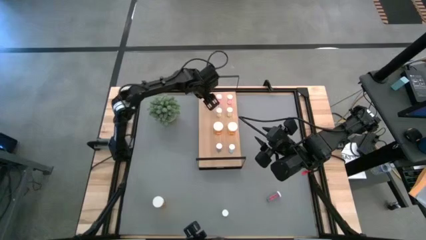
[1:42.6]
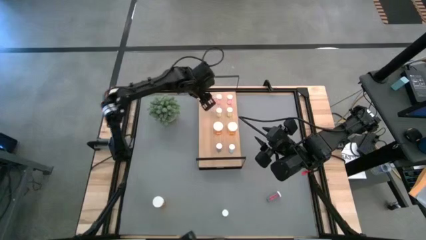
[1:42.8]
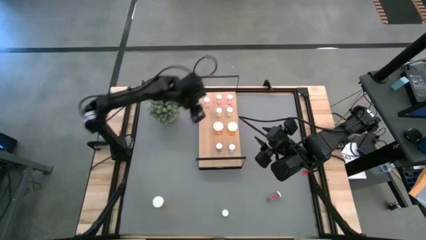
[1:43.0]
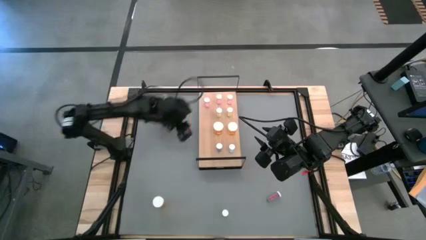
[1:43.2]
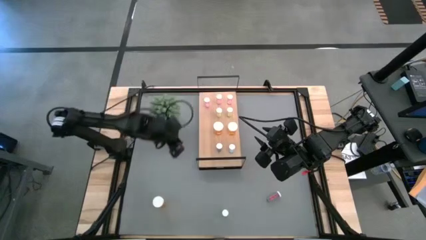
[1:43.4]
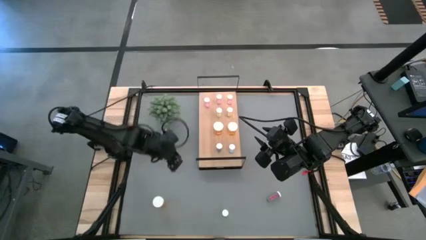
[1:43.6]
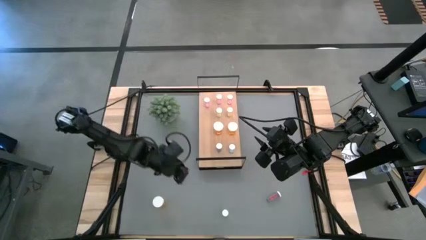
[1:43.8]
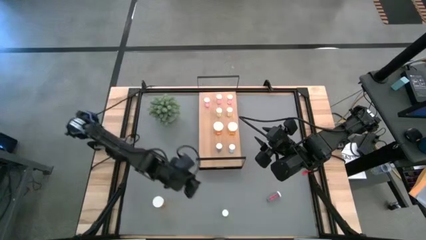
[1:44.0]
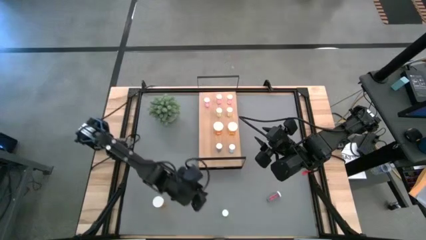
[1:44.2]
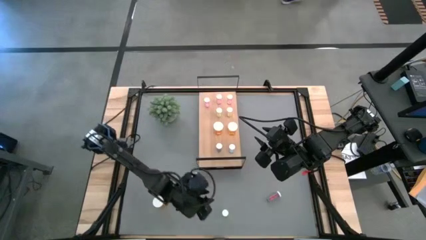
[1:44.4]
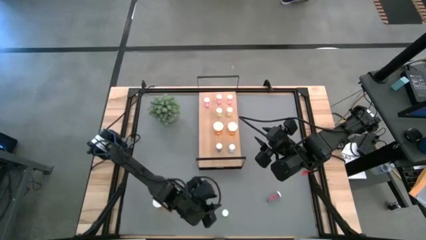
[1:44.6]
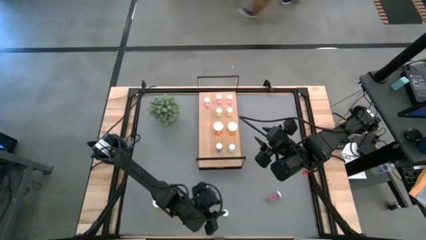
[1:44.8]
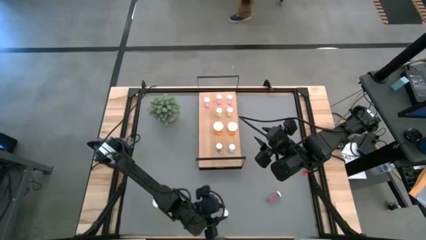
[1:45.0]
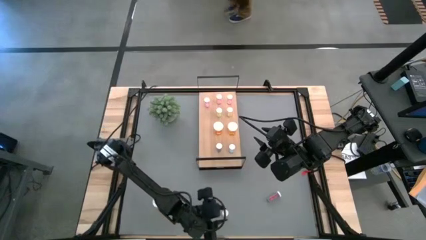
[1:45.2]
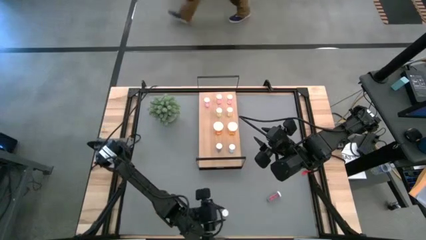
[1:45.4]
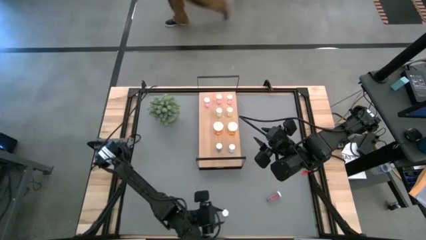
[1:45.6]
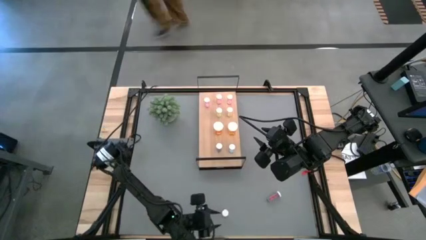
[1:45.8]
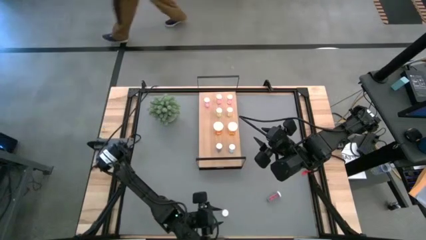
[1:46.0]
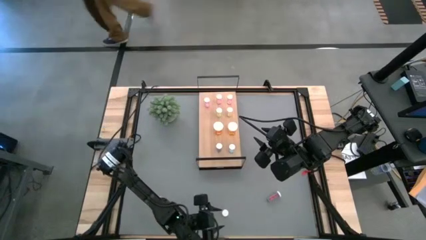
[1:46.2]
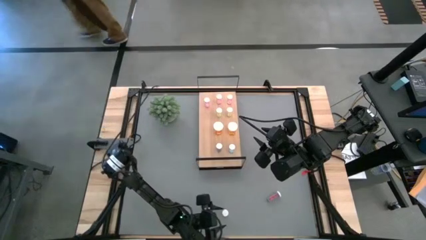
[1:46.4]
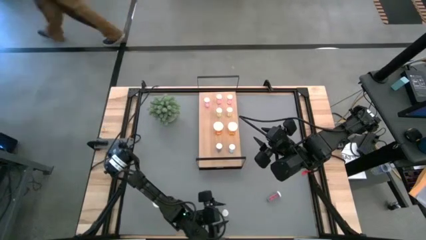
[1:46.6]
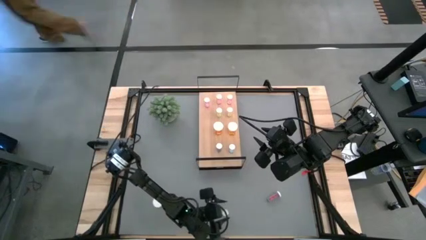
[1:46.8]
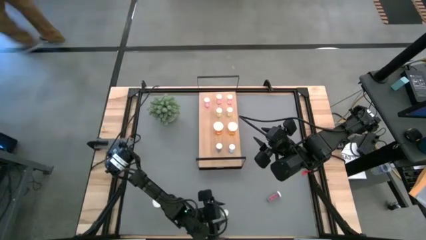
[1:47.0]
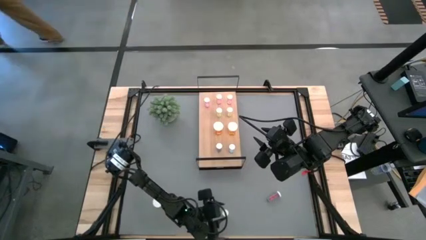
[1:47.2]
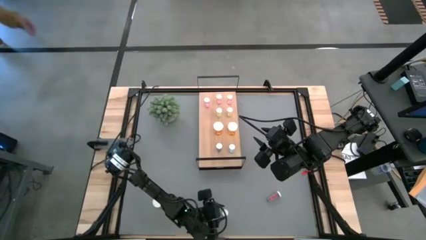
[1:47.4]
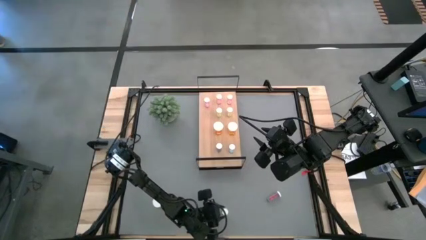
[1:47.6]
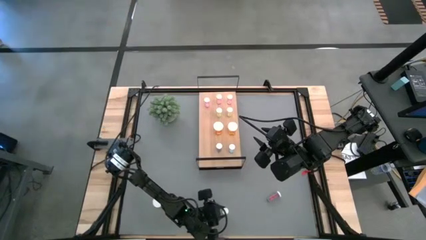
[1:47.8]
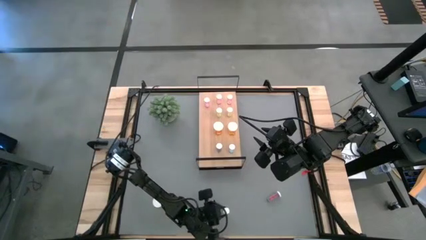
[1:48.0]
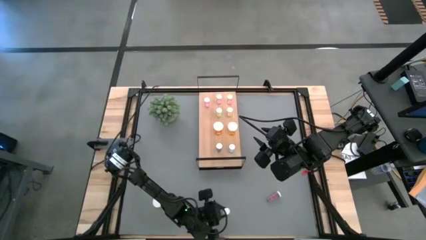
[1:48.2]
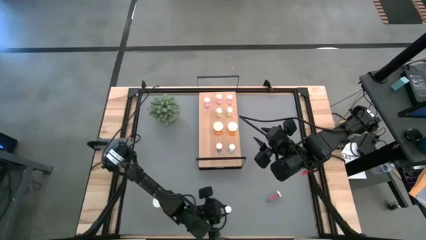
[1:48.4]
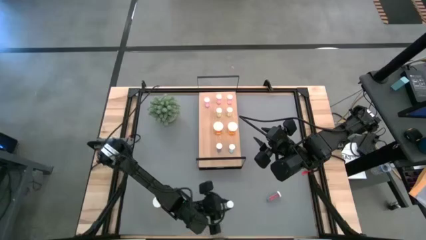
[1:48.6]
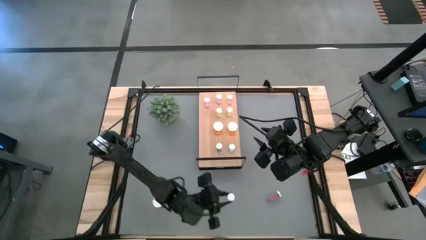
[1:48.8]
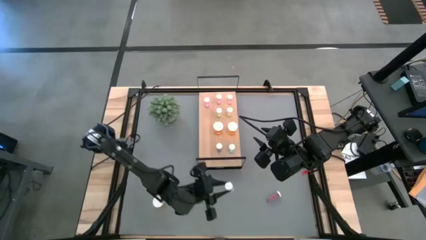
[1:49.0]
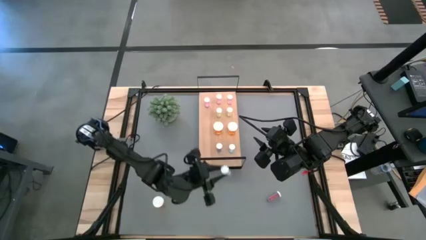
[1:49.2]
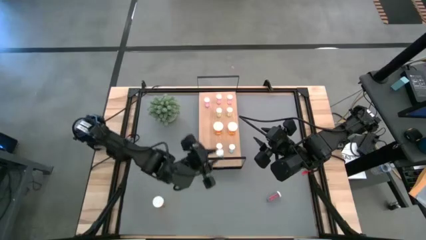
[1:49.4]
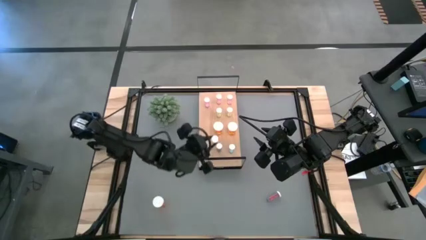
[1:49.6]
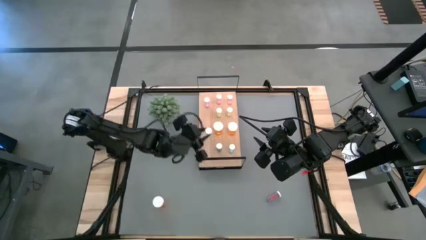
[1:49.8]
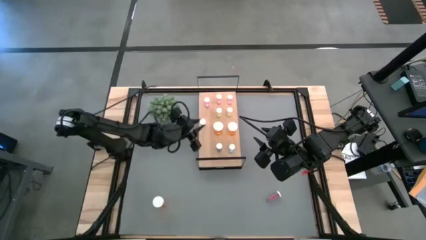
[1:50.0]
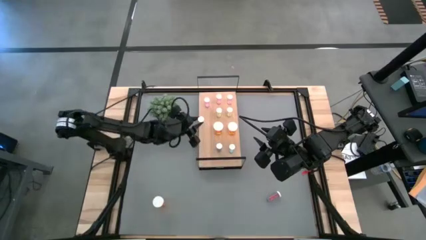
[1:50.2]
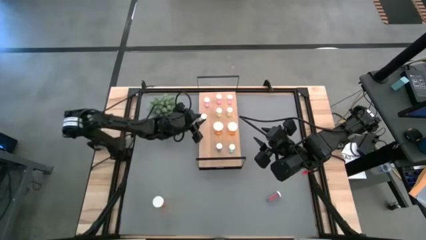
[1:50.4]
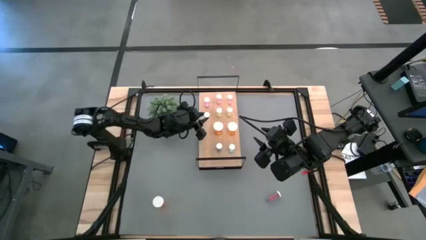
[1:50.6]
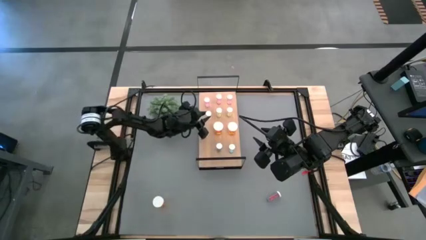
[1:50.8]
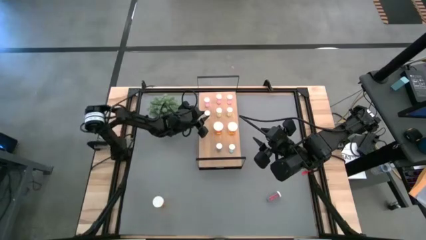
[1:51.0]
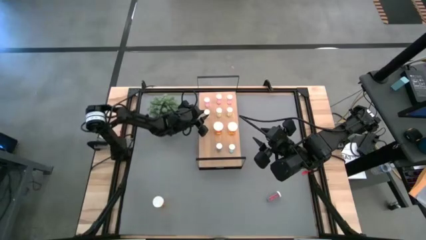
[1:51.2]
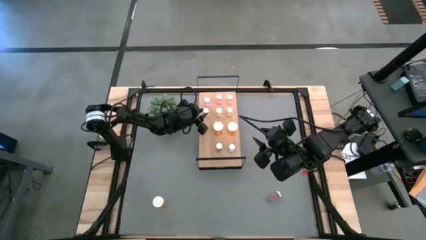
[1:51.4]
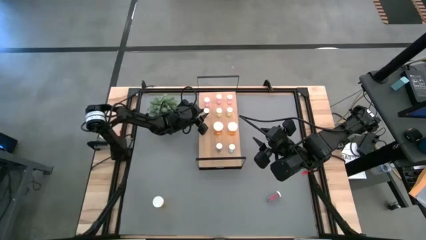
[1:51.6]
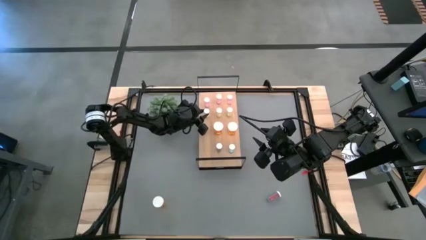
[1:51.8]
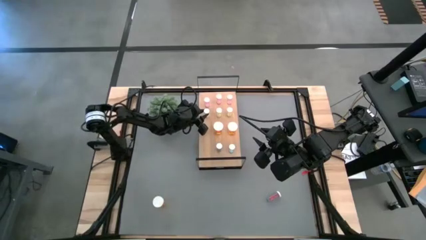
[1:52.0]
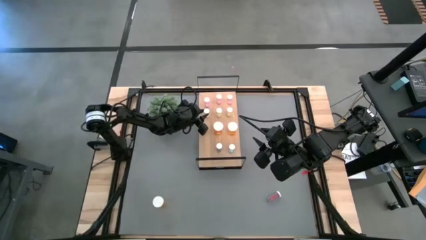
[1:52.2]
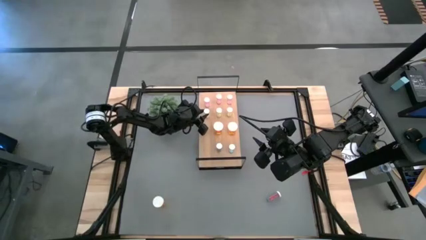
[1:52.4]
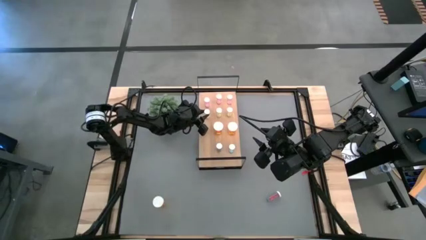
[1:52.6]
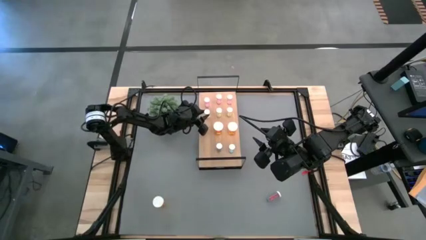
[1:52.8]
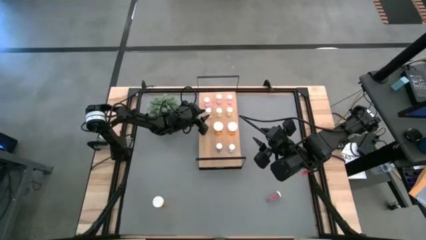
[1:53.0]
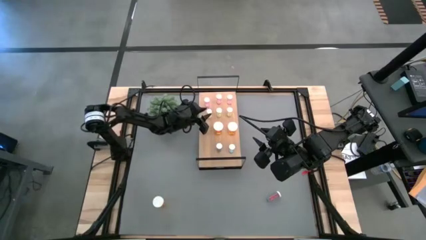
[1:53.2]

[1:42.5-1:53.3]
Task: Pick and place medicine bottles onto shelf by color
Put the yellow pill bottle aligned with the other yellow pill bottles on the shelf
